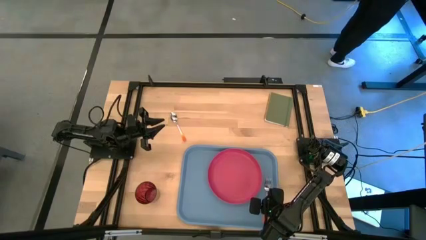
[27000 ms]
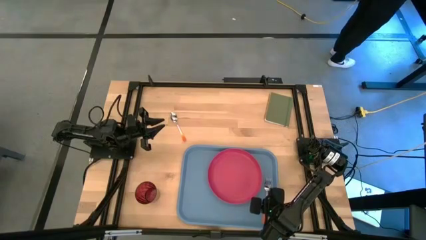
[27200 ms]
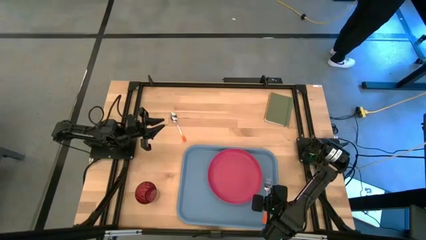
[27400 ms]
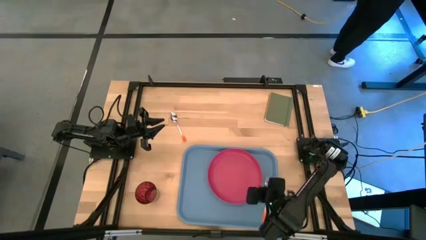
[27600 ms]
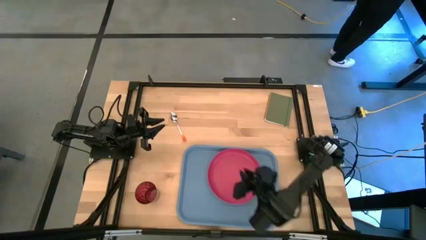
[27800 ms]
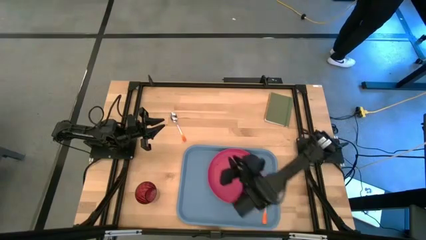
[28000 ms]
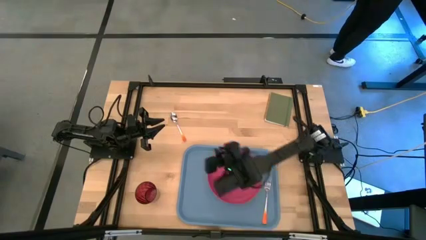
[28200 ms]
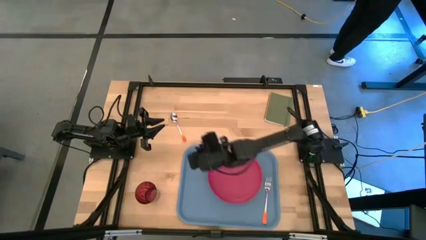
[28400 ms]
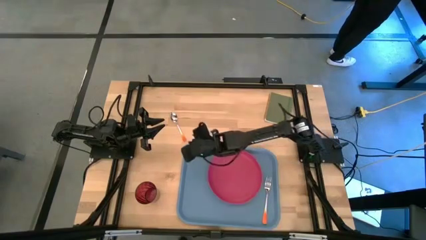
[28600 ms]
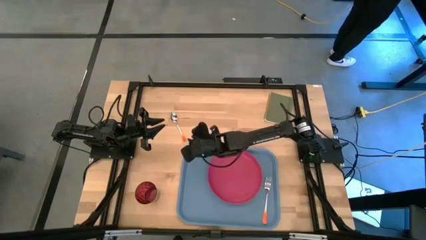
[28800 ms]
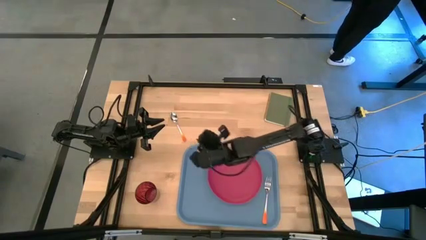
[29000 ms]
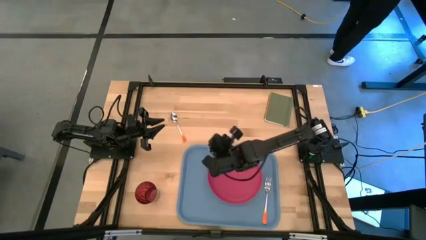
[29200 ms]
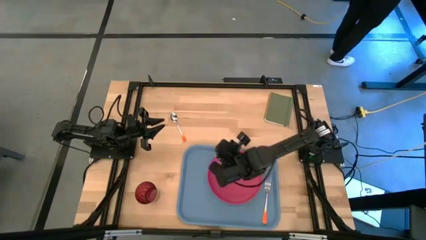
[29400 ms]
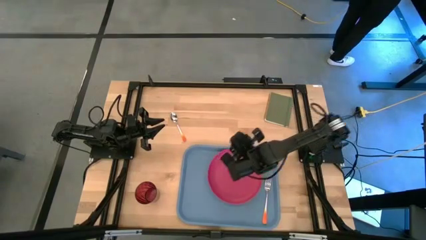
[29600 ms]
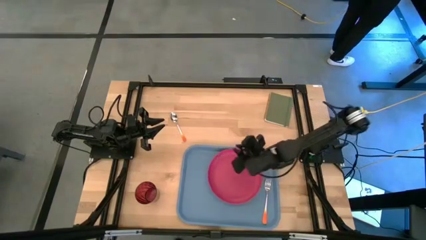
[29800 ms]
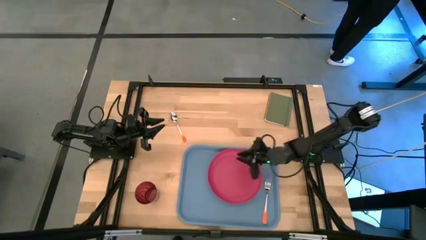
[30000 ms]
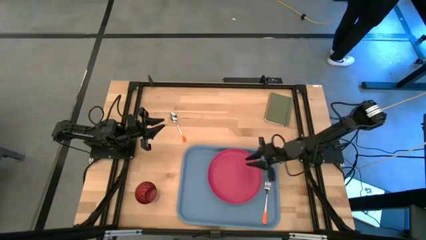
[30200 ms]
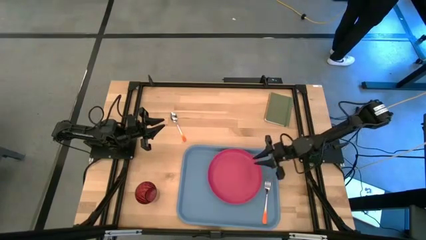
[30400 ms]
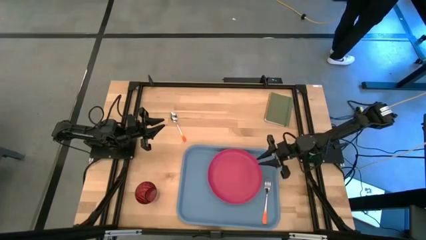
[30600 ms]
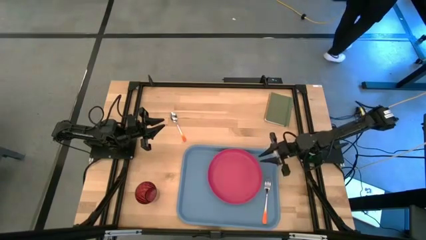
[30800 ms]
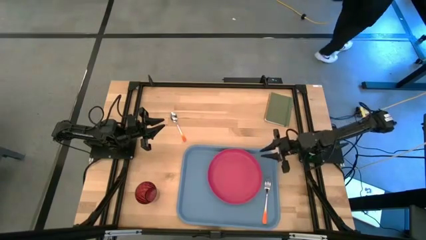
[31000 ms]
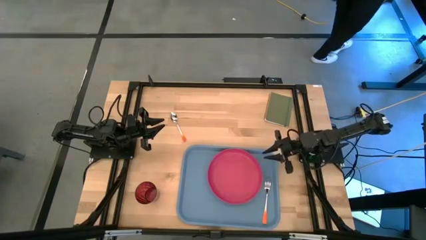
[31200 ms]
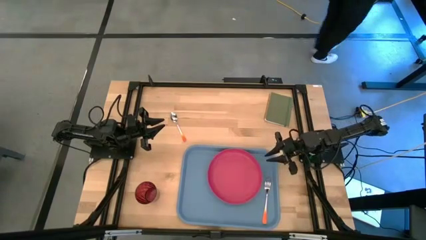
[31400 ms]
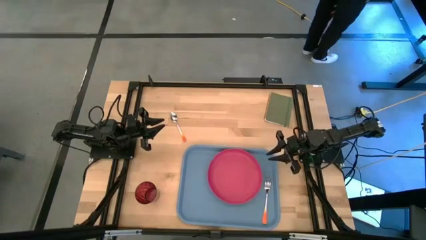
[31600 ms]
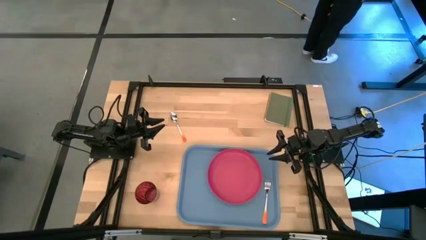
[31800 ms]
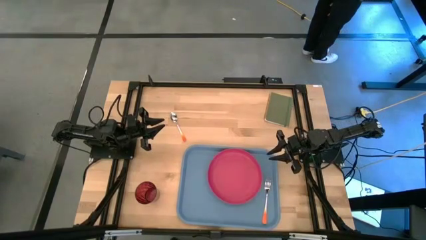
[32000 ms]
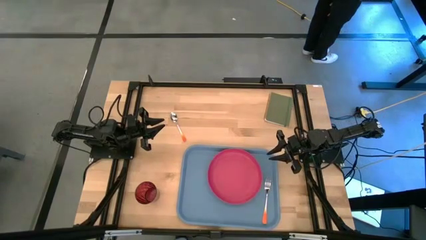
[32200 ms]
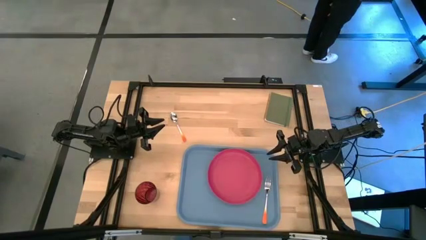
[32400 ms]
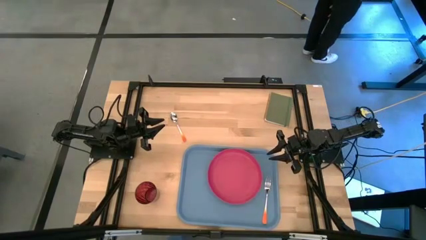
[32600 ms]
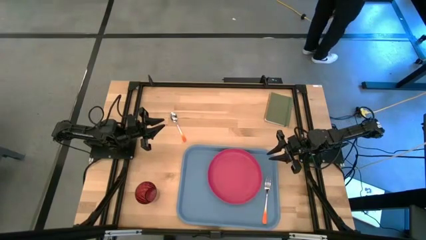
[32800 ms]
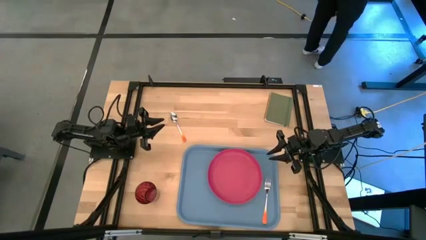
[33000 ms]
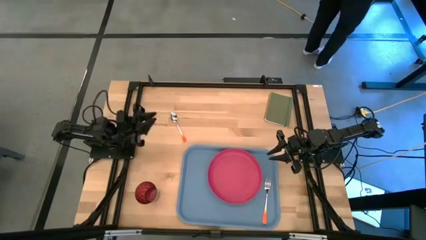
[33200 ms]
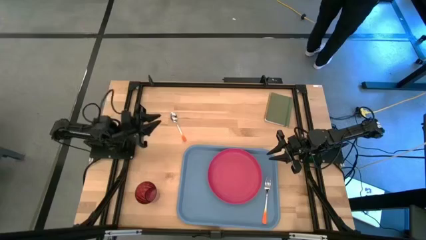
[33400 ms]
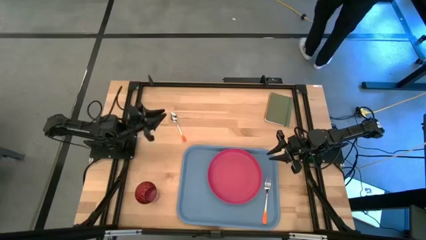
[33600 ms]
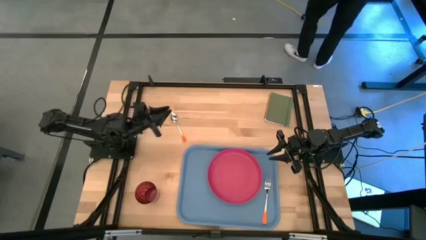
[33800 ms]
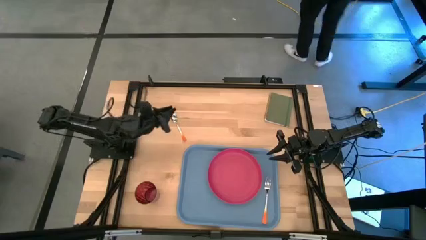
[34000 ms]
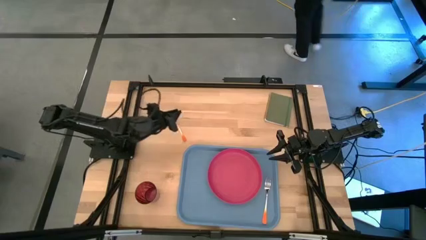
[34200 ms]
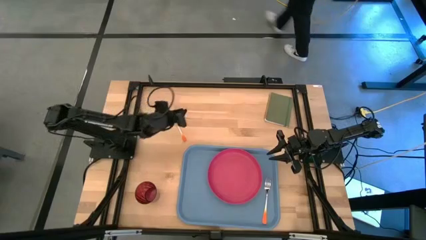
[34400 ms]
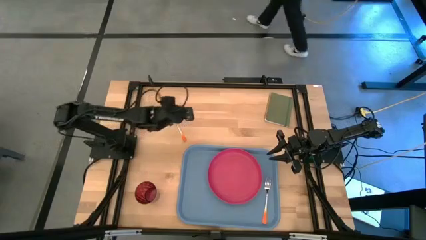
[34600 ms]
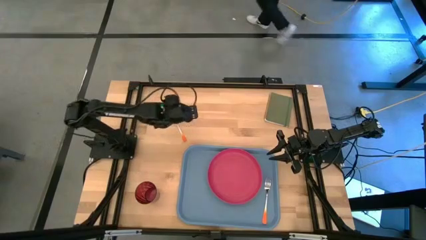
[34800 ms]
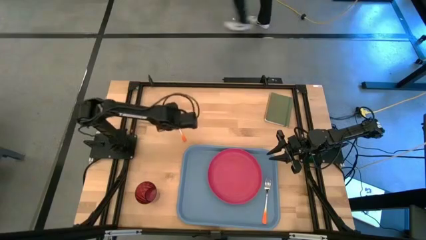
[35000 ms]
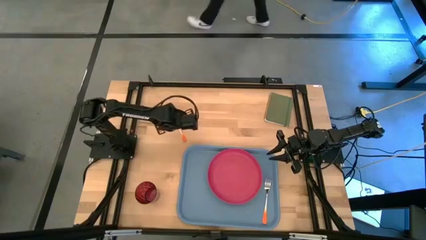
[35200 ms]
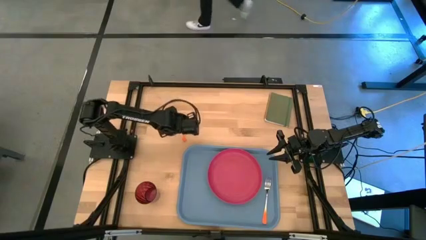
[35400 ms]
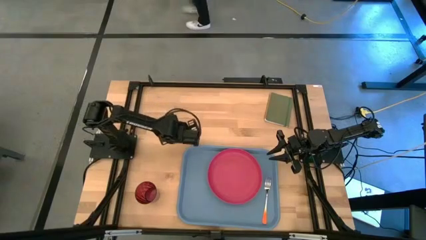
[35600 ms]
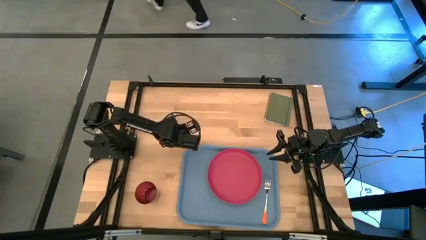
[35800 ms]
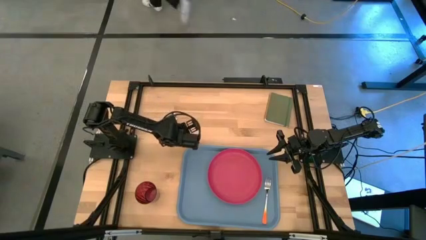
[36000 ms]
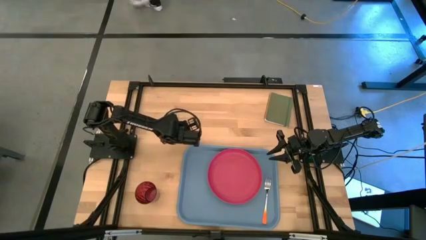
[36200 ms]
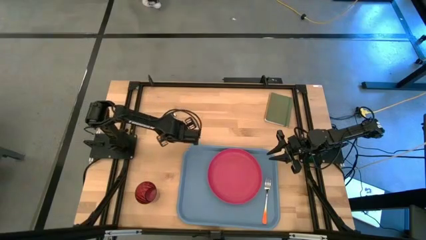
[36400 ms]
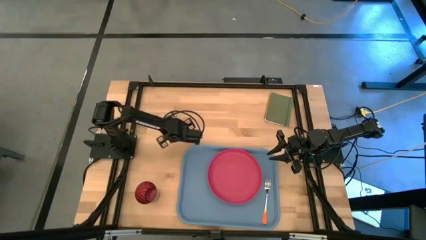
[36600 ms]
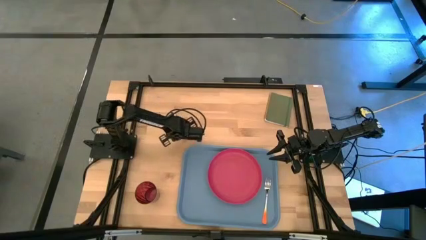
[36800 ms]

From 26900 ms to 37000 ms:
Task: Pick and place plate/cup/fork/spoon on tray
Put the orange spoon to the left of the pink serving tray
